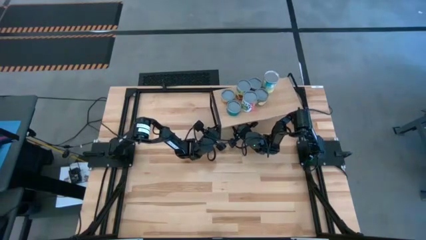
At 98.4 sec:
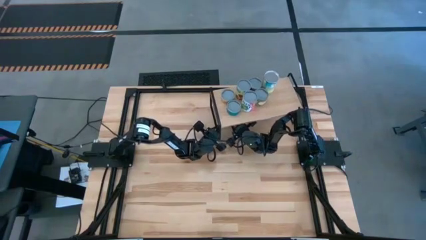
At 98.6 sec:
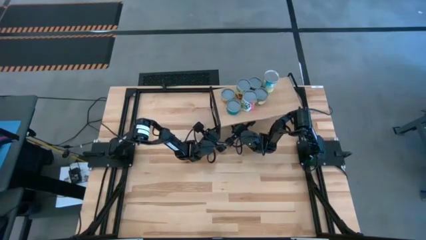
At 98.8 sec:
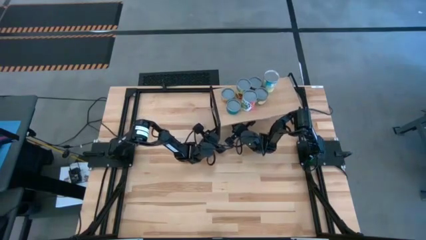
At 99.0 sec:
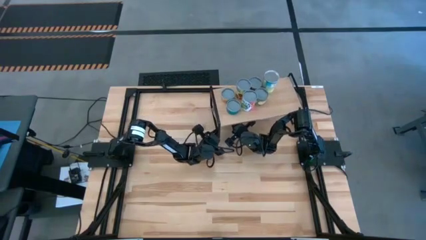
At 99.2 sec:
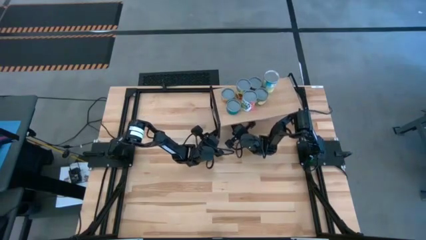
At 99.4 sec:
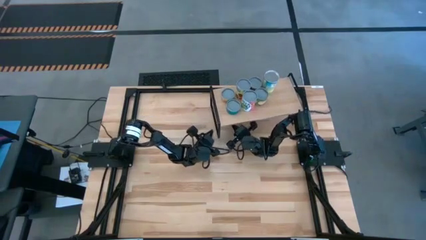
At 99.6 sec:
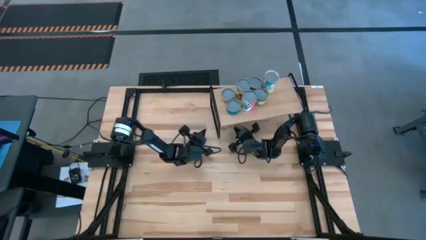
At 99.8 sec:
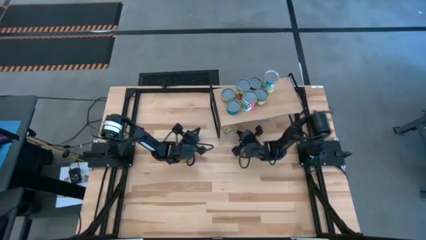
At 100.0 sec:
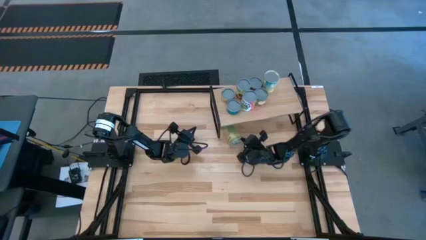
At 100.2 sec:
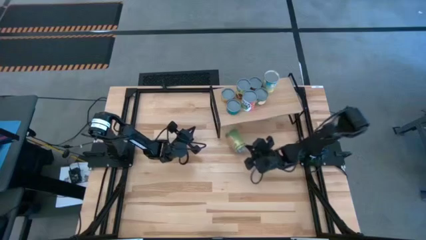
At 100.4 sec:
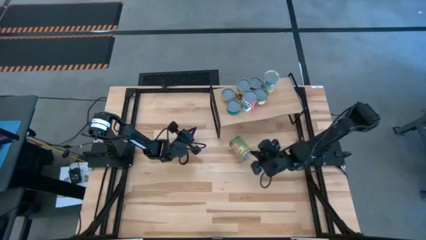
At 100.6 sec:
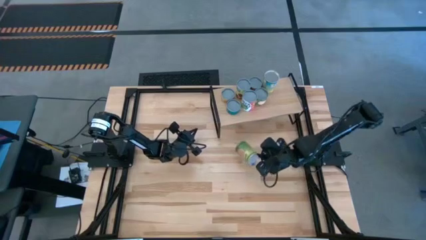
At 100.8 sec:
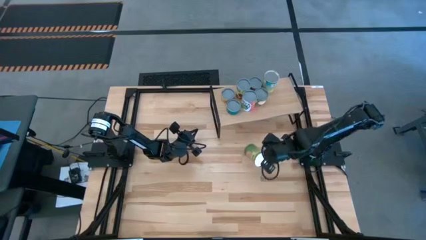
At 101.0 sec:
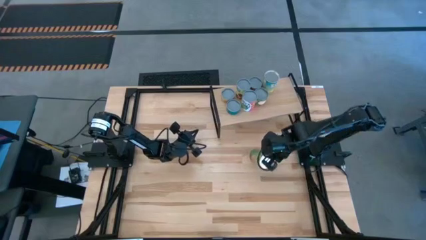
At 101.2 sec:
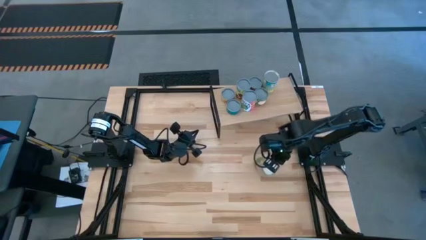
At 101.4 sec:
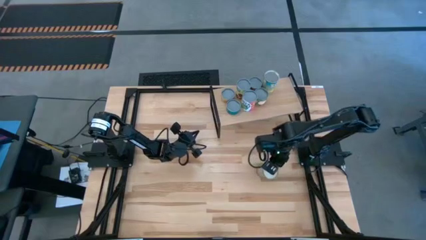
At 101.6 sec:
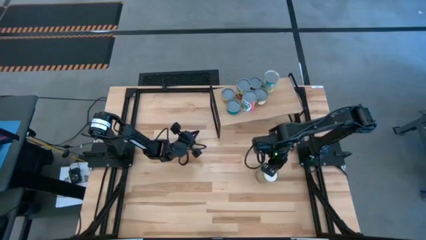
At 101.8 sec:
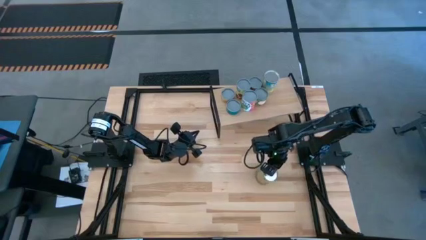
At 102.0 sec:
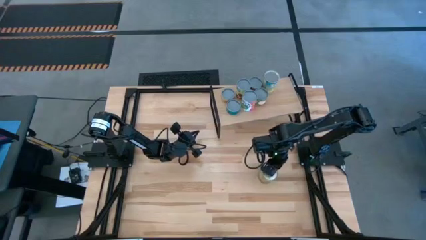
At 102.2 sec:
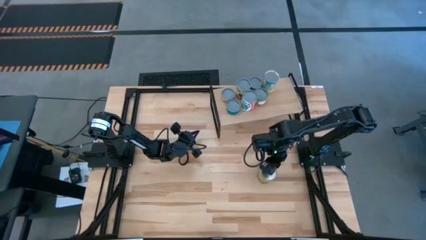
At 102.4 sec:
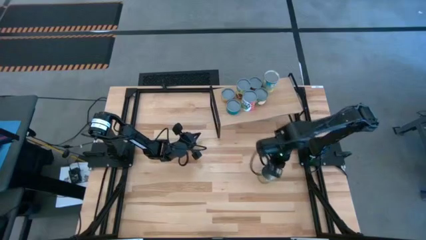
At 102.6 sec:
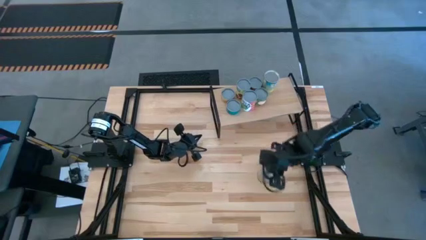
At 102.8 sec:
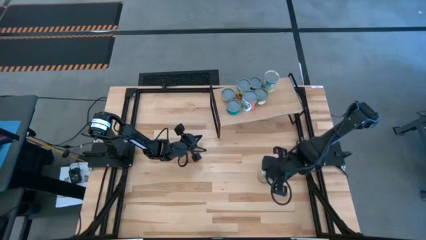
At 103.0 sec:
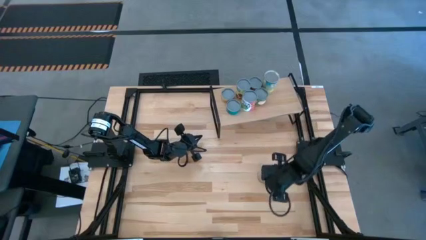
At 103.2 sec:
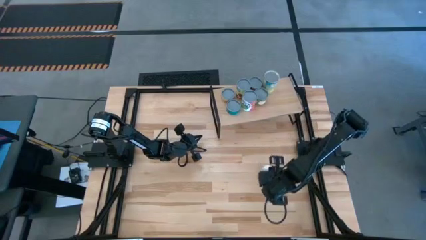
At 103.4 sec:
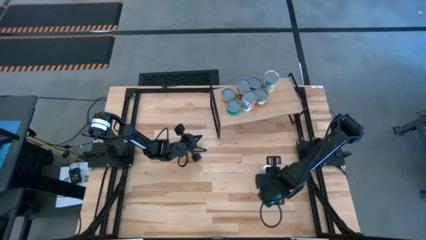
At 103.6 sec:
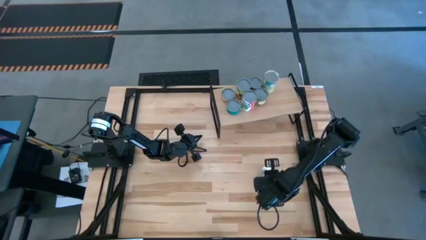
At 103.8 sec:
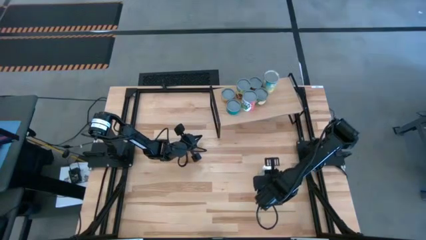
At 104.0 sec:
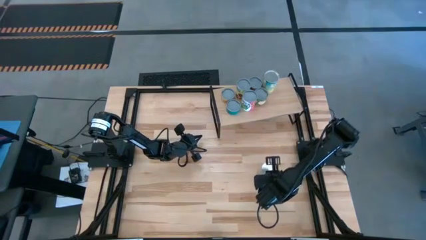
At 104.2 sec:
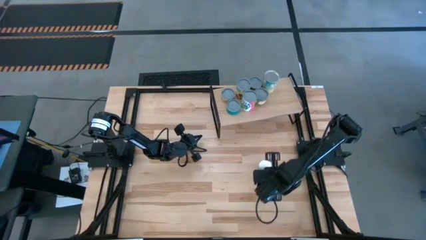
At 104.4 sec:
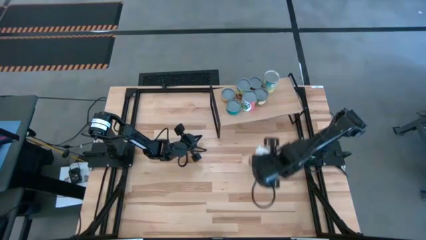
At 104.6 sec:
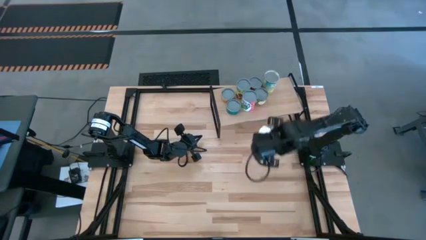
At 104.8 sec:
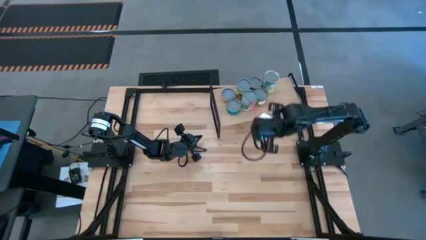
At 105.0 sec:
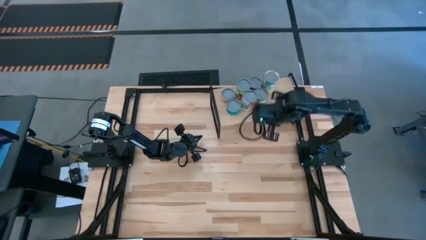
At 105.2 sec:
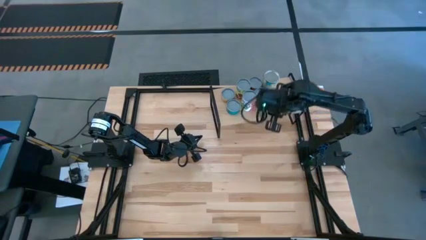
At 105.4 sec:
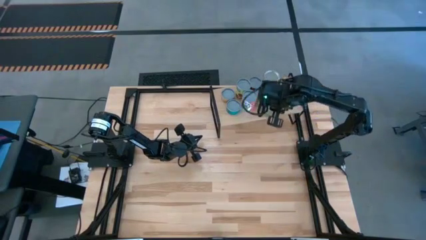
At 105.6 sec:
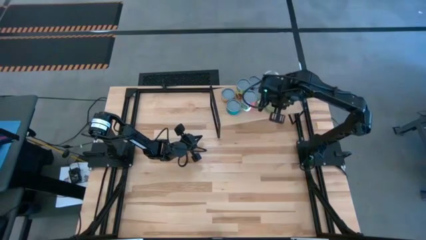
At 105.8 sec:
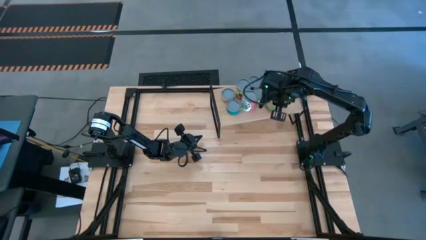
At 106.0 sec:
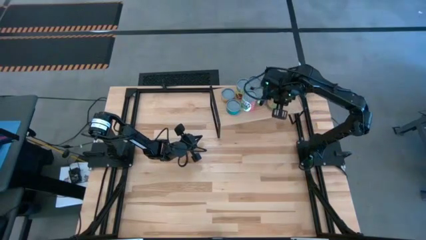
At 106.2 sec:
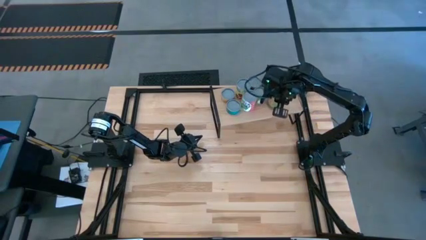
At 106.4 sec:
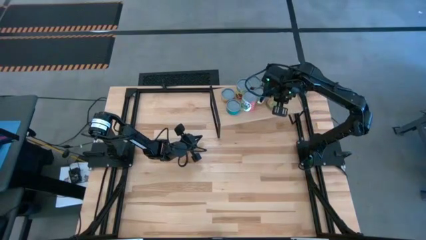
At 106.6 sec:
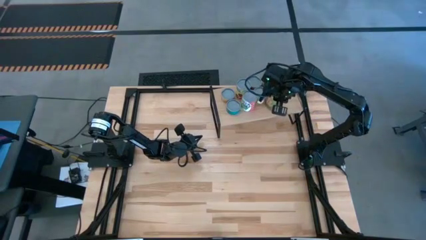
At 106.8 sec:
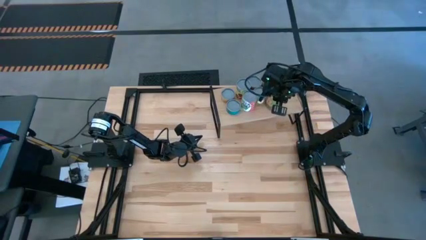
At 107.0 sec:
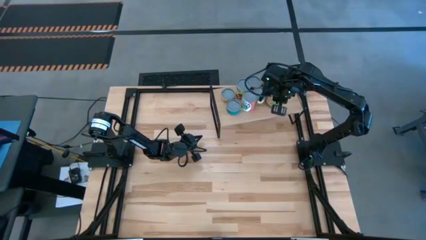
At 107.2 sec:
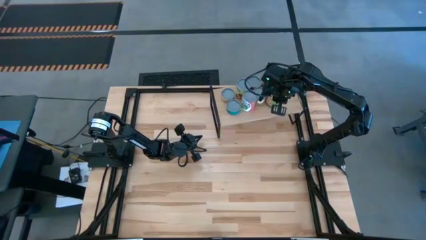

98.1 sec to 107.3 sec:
Task: Pick and place cans onto a shelf
Put the canned oranges on the shelf

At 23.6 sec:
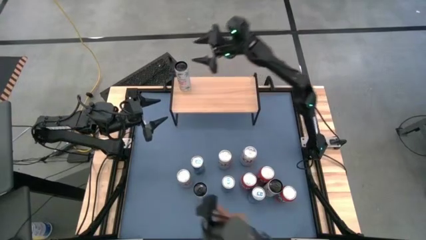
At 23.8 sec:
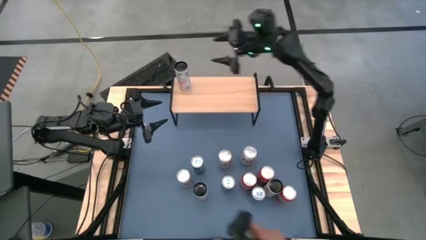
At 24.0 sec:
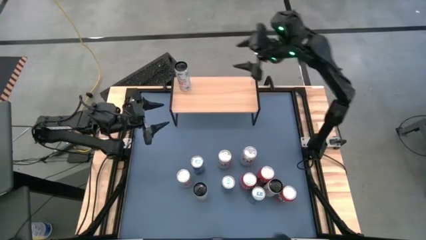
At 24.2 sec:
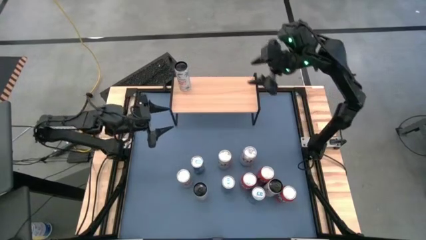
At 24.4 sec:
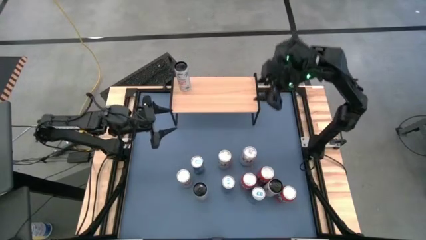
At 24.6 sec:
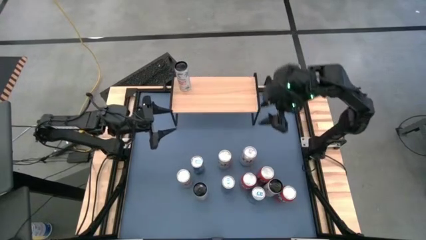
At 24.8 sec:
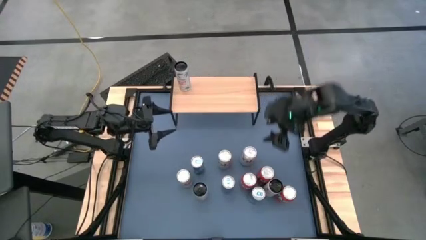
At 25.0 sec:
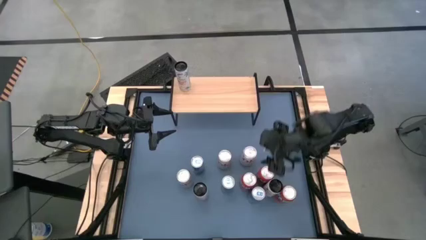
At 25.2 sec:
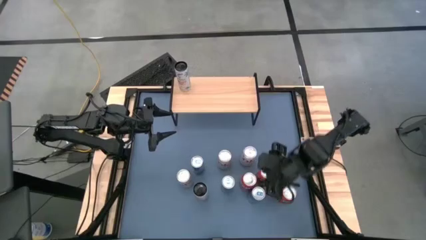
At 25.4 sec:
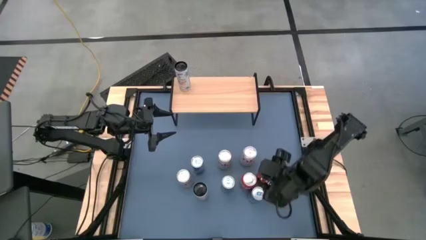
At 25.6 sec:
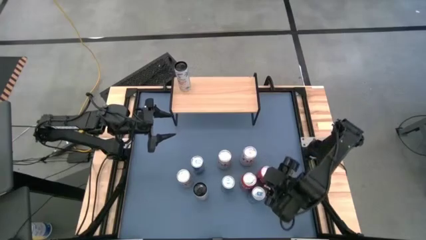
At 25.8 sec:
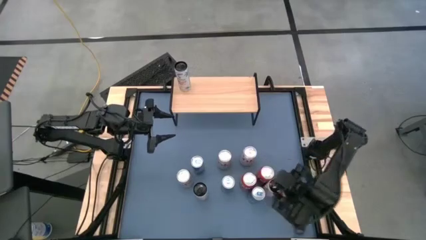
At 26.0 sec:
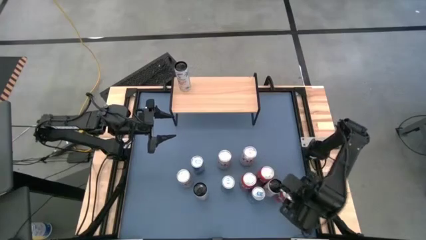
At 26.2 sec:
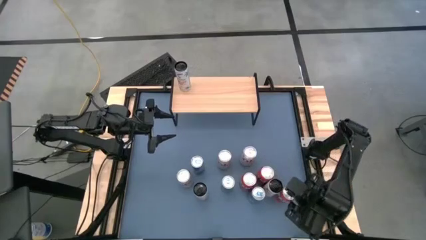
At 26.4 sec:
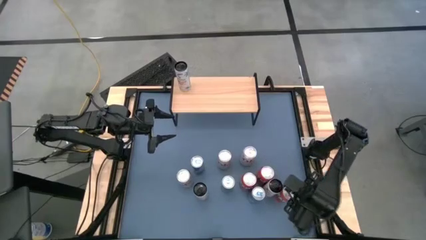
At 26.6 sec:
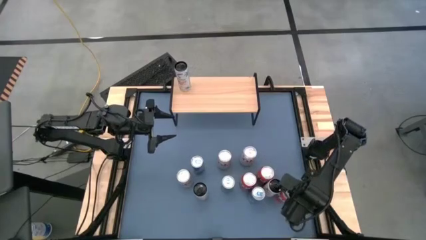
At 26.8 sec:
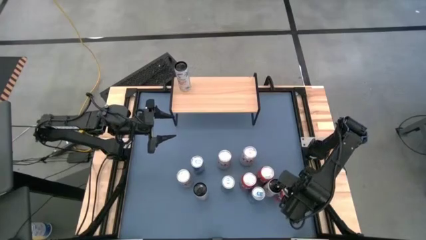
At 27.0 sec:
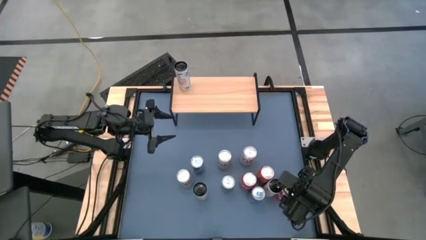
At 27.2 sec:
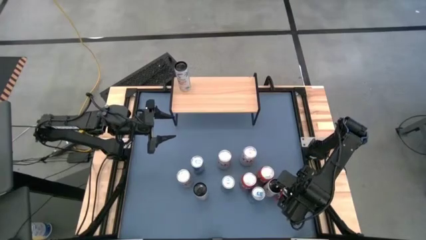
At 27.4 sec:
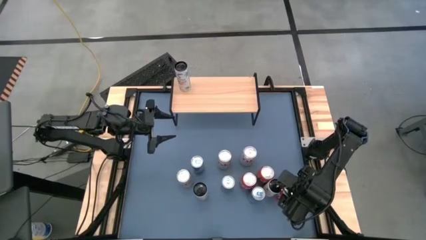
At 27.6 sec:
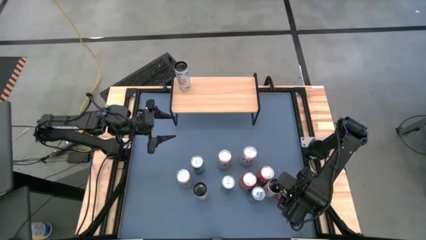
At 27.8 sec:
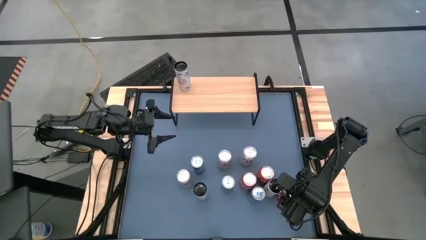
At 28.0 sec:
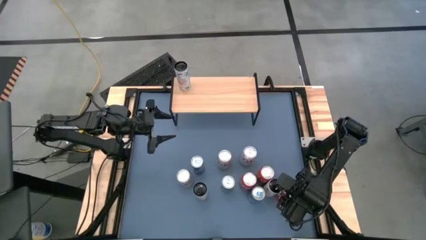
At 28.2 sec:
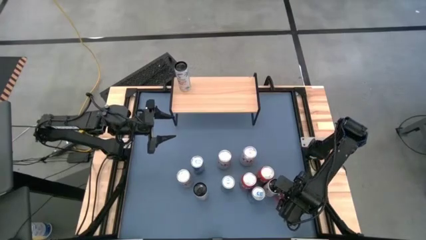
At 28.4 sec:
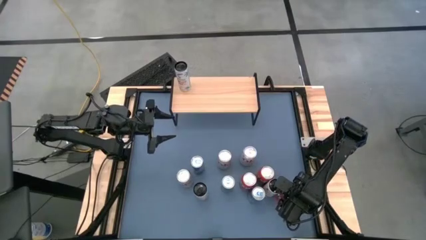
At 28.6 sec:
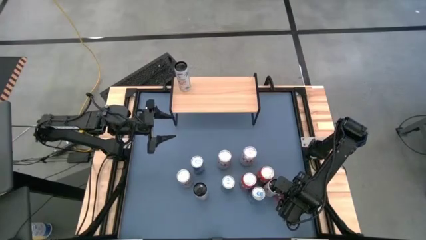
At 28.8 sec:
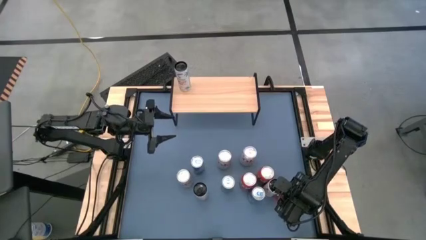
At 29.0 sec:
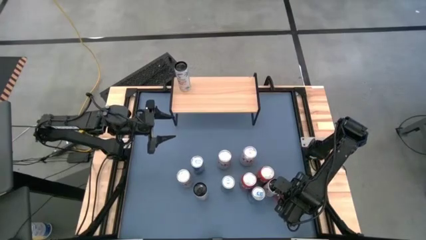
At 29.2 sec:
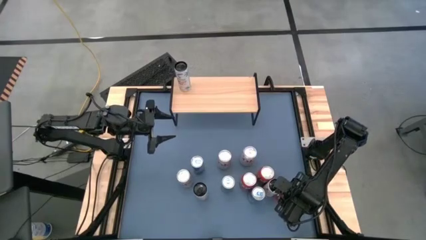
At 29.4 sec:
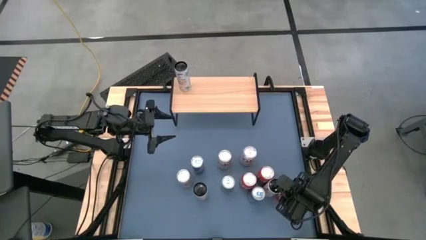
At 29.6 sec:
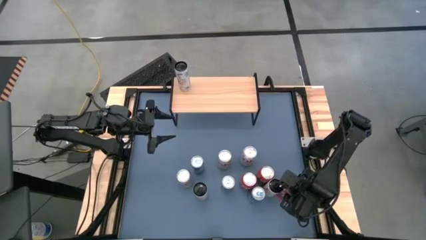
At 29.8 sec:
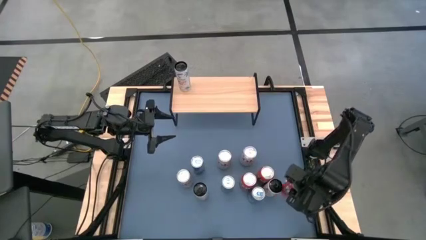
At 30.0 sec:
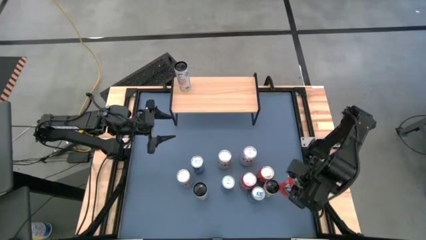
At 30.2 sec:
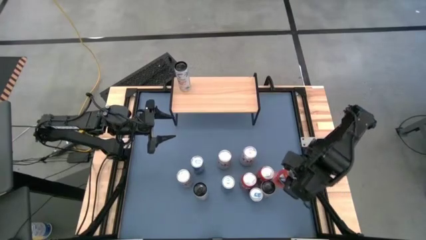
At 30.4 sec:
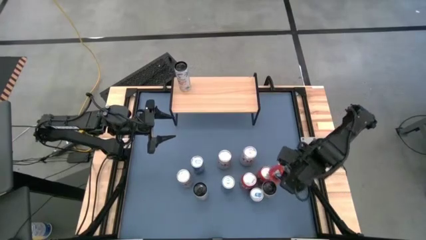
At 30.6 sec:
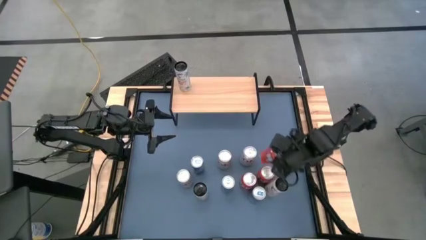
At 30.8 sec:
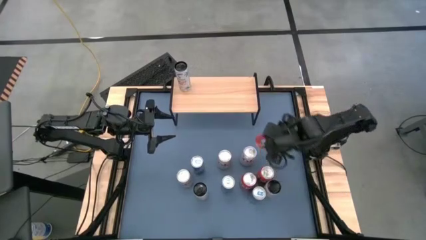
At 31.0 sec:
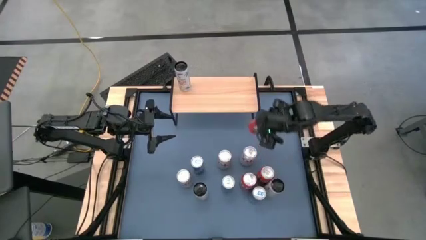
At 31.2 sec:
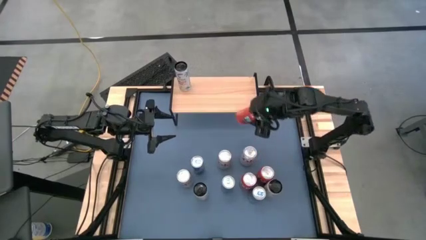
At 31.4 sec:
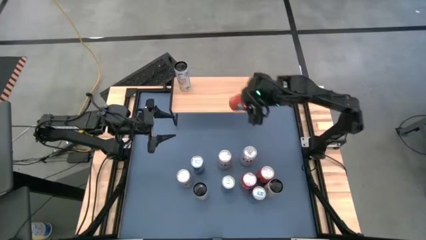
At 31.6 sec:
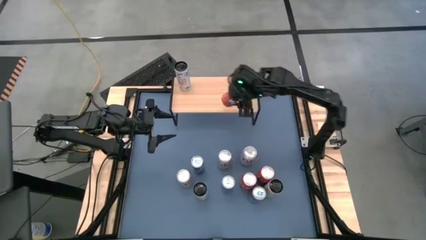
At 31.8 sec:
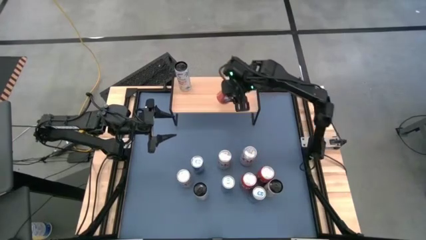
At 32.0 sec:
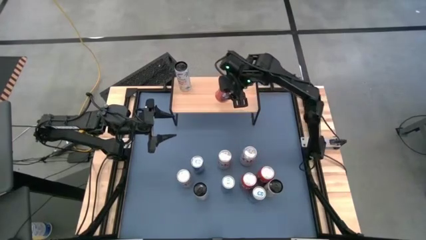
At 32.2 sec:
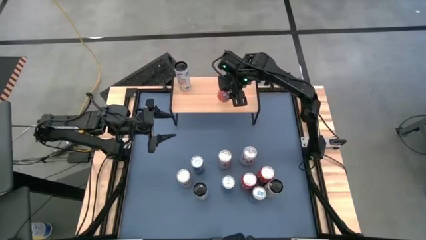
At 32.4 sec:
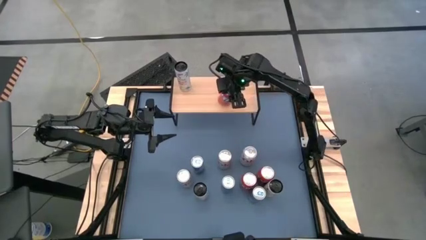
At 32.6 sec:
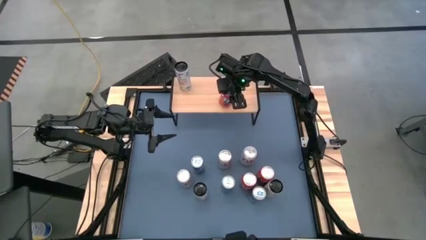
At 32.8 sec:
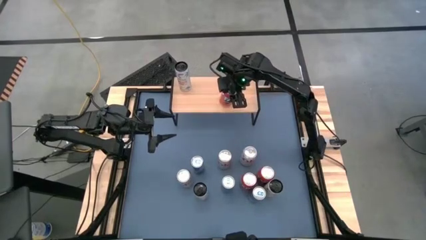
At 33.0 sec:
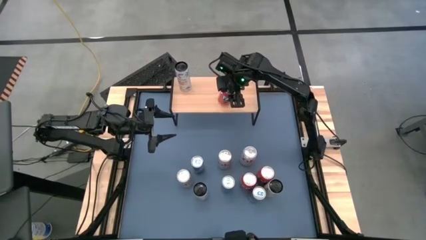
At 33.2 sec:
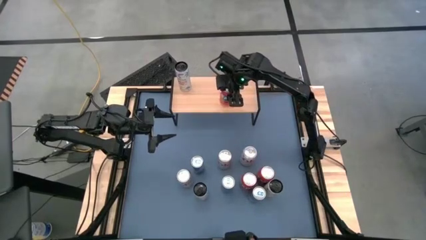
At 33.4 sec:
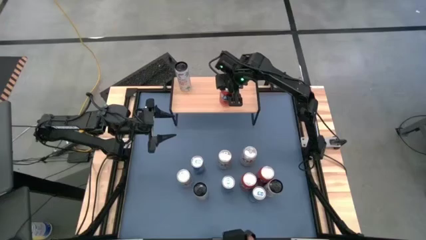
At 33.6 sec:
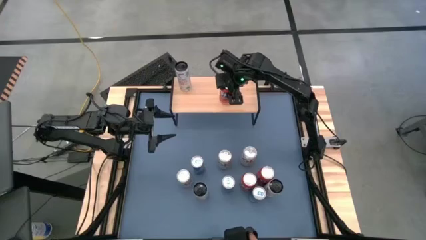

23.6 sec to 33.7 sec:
Task: Place canned beverage on shelf
Put the bottom right orange soda on the shelf
